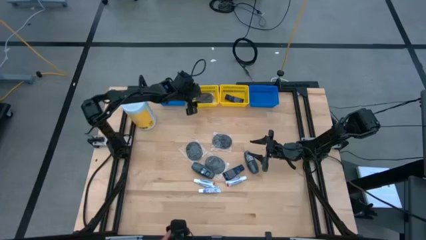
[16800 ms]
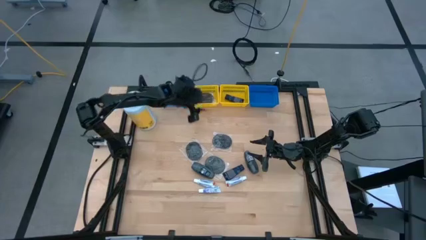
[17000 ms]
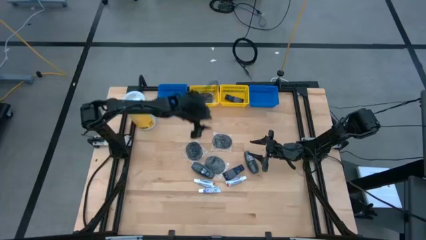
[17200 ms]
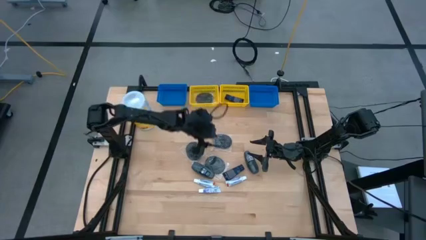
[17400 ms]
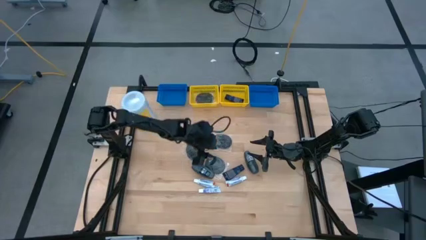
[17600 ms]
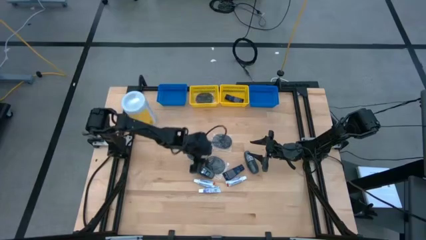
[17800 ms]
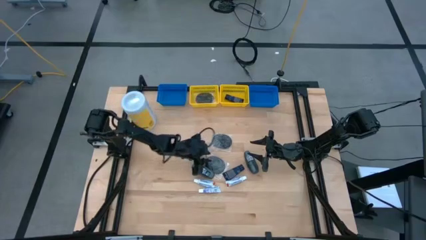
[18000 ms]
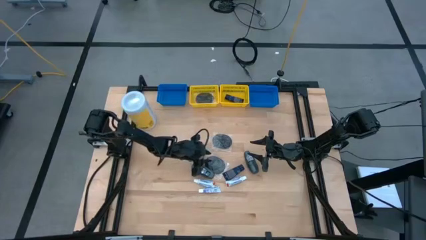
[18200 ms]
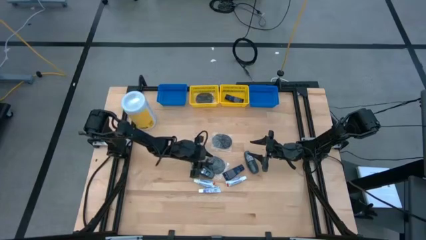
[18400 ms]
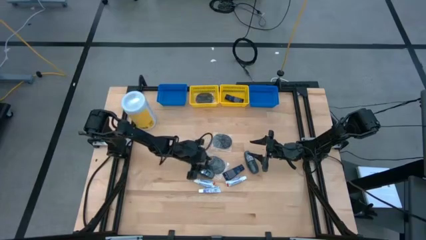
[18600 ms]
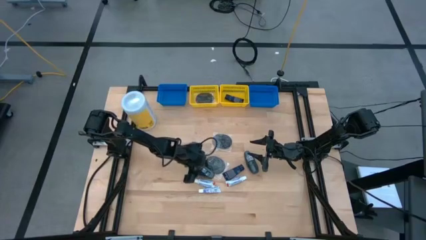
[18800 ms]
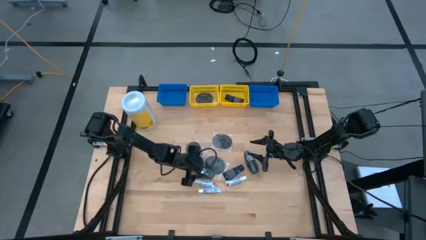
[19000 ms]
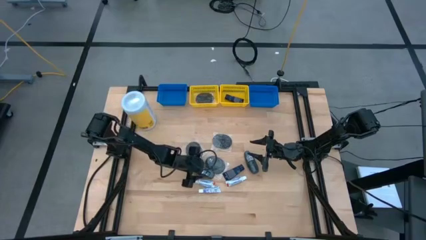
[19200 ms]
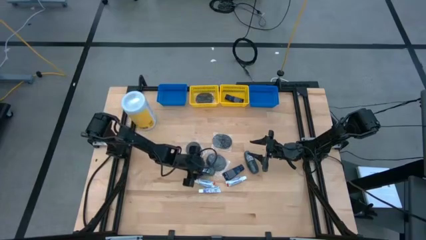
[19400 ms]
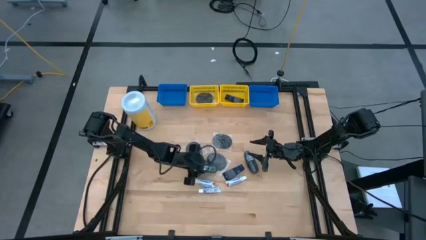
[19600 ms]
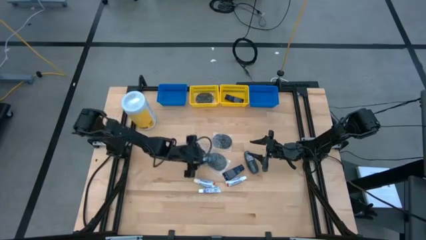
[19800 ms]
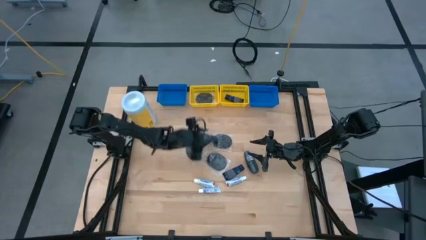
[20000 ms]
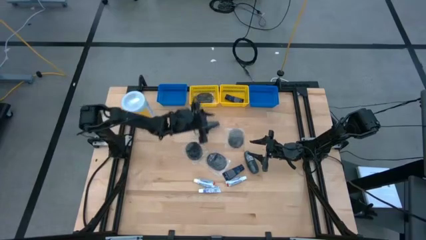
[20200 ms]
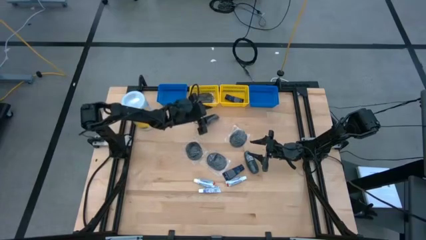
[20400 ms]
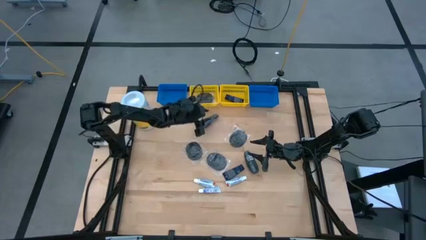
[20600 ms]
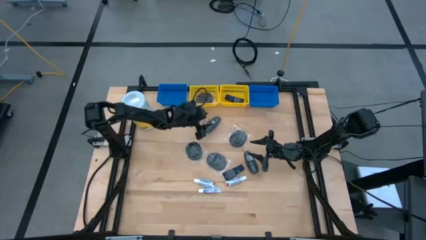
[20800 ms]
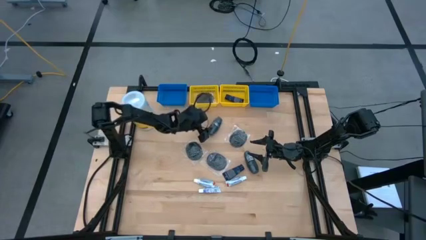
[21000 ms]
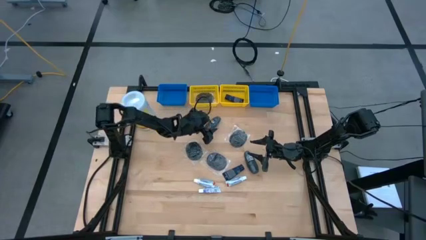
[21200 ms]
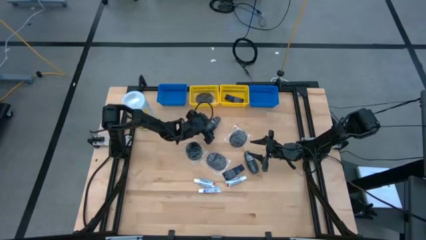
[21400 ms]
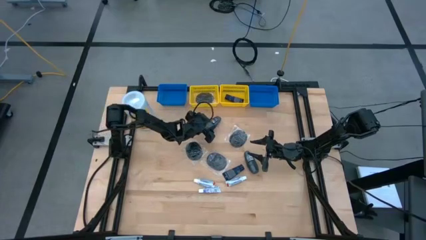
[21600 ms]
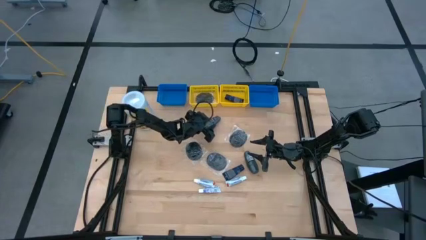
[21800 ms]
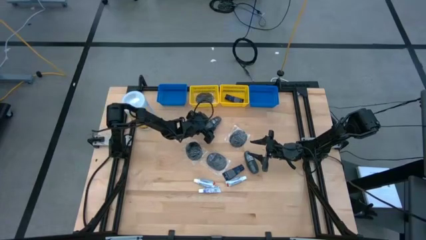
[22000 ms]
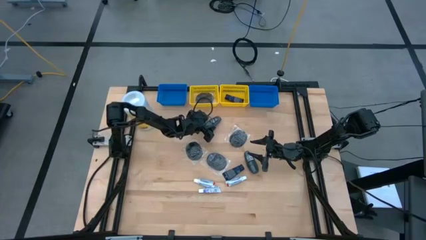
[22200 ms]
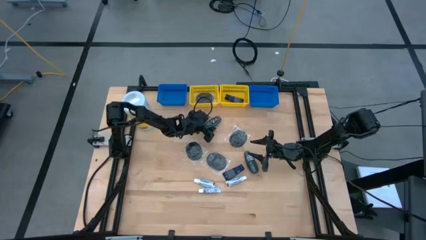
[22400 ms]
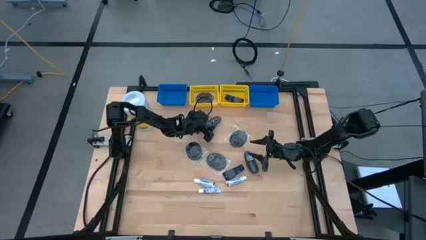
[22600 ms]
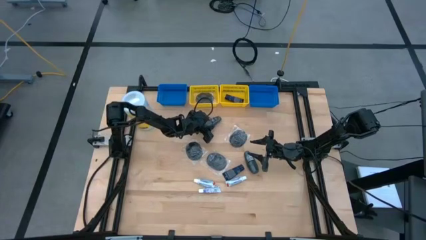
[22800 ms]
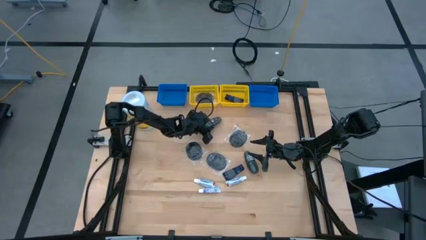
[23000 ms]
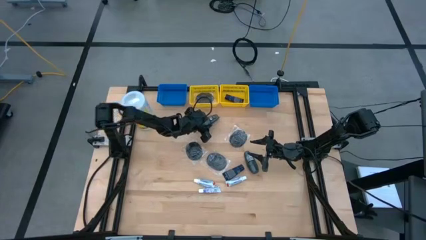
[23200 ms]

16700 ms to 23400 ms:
Task: Pick & Place Travel size toiletries
Put the deodorant into the left blue bin

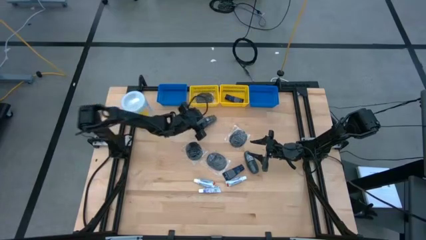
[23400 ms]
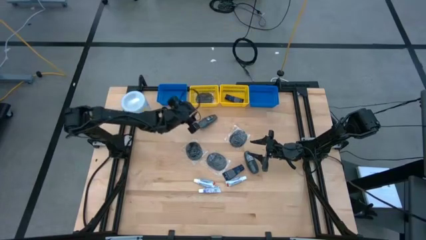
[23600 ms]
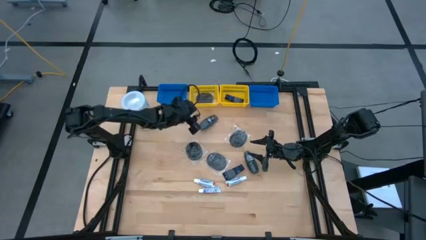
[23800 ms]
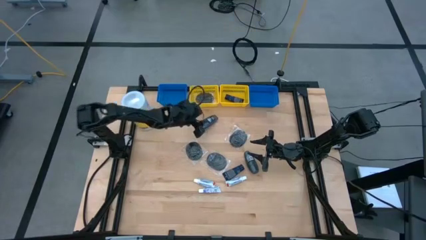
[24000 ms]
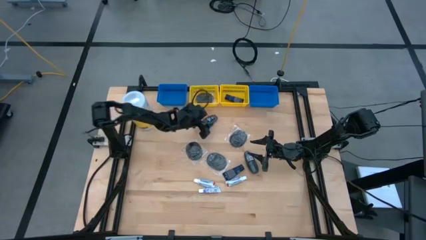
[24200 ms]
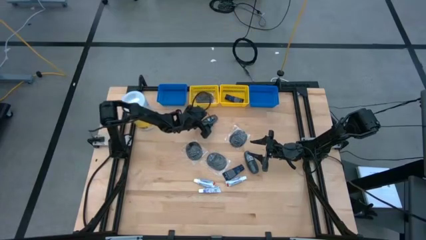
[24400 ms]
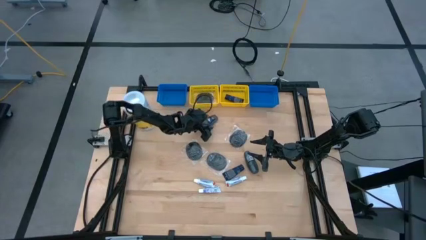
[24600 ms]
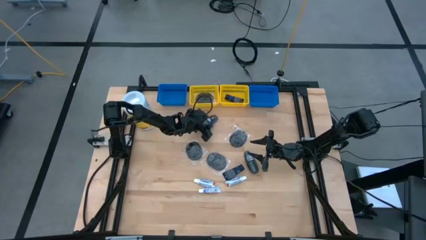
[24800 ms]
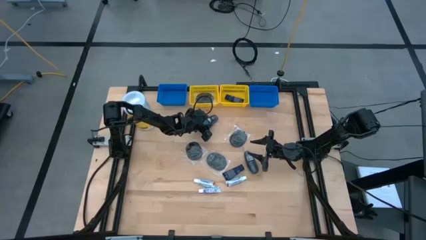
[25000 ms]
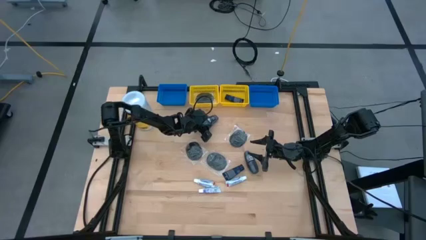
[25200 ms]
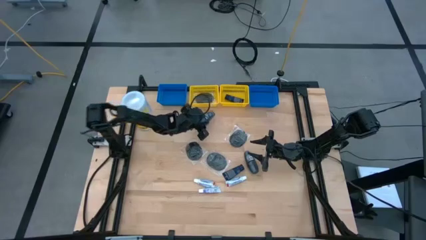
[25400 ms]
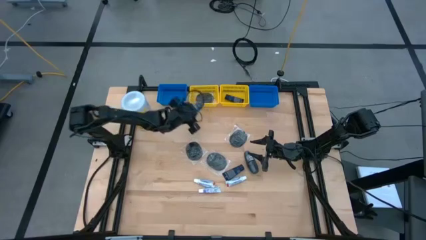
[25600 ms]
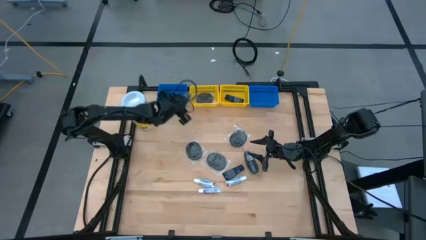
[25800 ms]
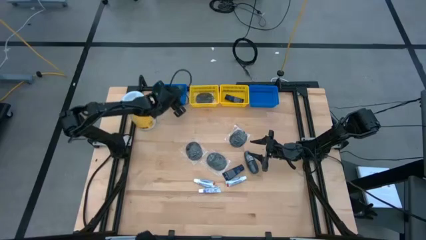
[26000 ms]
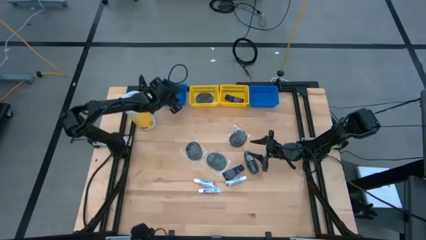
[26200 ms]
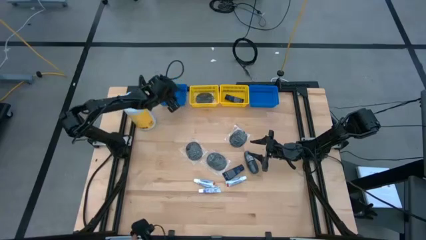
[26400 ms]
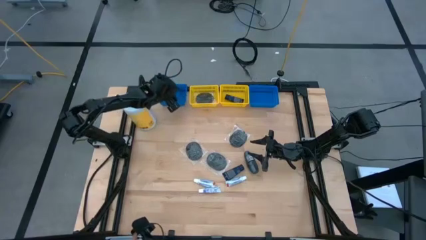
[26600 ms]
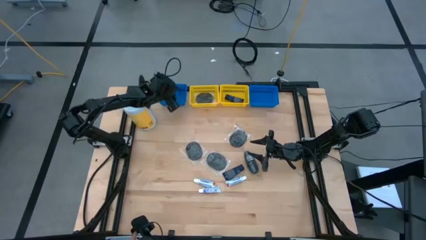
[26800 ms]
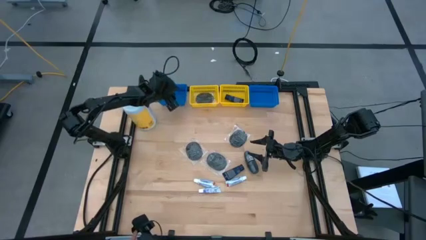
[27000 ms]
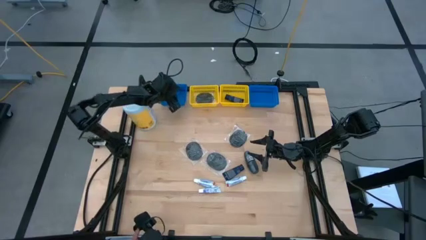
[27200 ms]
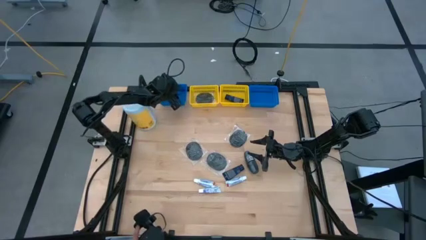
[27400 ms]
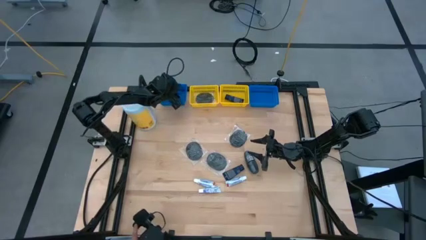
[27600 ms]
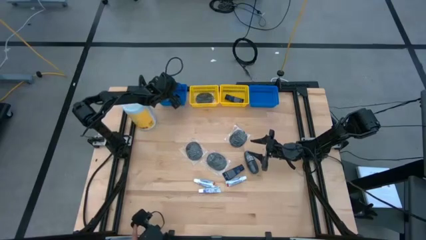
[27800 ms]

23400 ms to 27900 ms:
Put the deodorant into the left blue bin

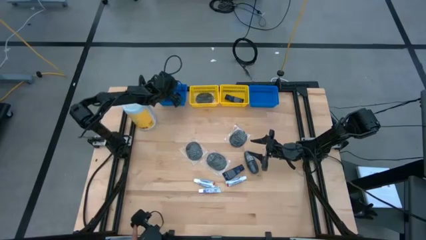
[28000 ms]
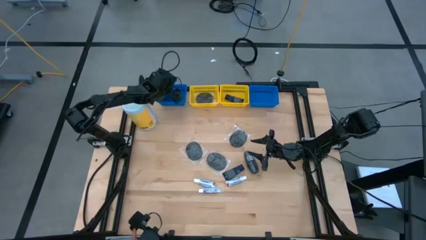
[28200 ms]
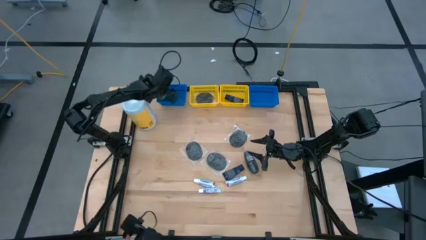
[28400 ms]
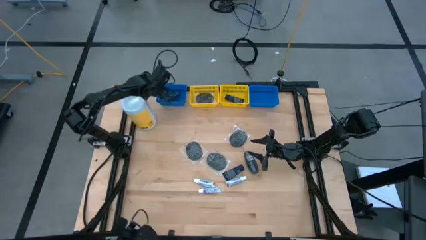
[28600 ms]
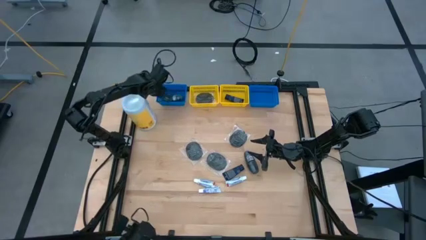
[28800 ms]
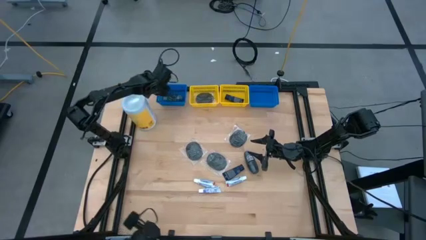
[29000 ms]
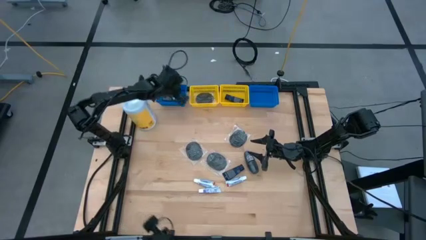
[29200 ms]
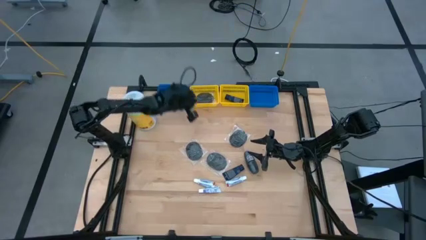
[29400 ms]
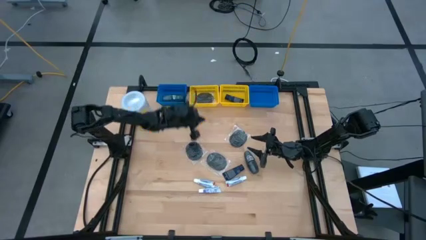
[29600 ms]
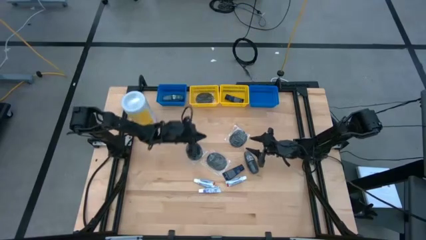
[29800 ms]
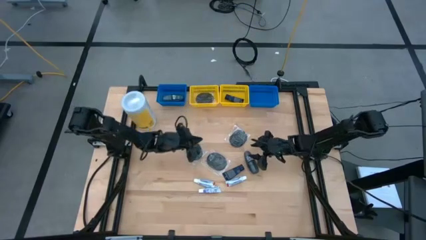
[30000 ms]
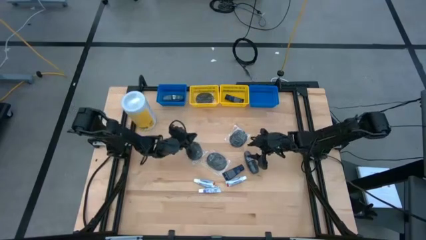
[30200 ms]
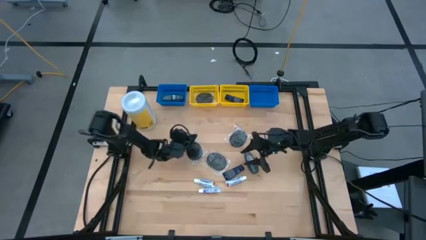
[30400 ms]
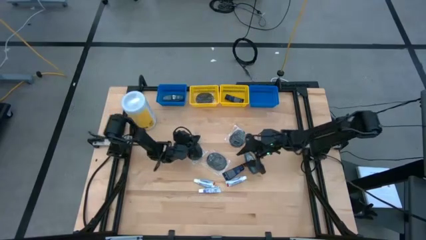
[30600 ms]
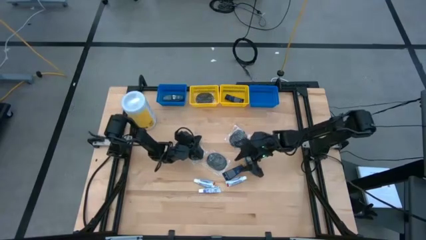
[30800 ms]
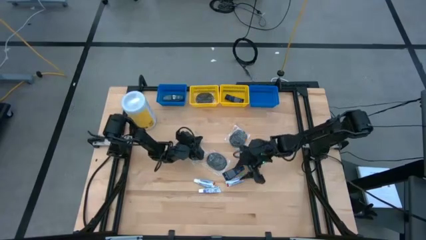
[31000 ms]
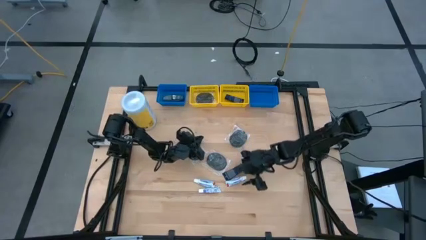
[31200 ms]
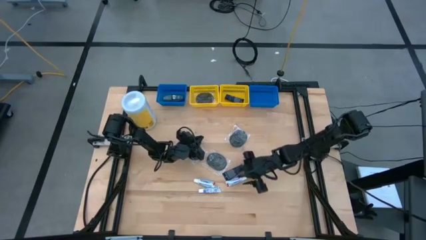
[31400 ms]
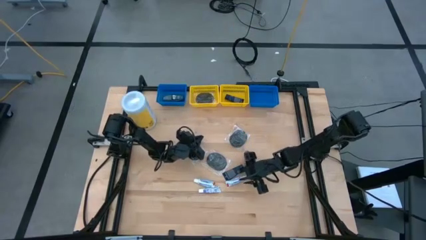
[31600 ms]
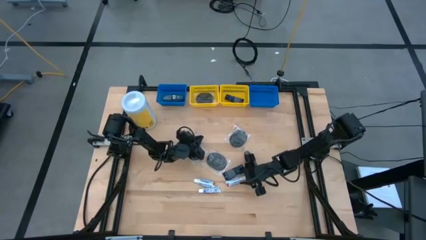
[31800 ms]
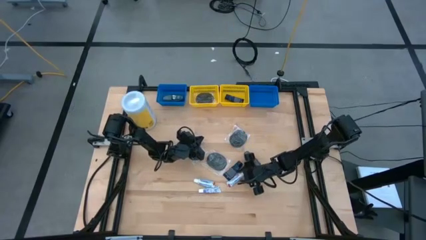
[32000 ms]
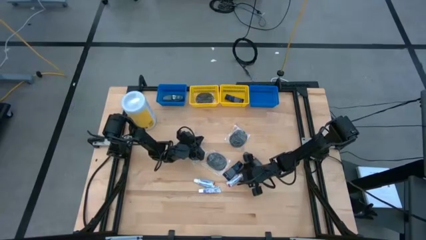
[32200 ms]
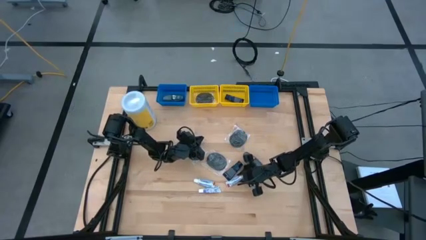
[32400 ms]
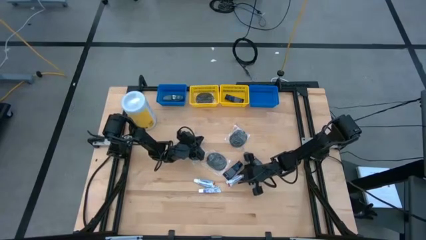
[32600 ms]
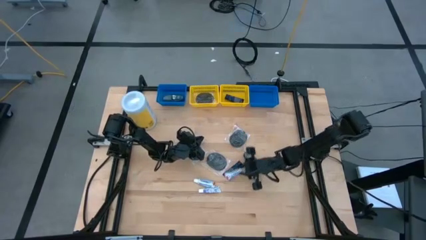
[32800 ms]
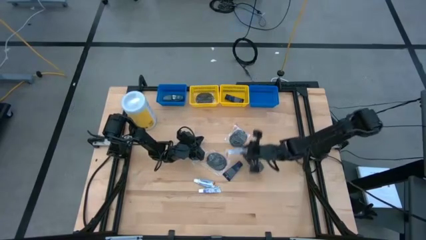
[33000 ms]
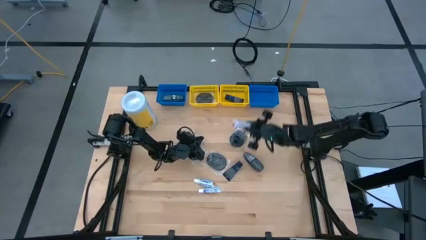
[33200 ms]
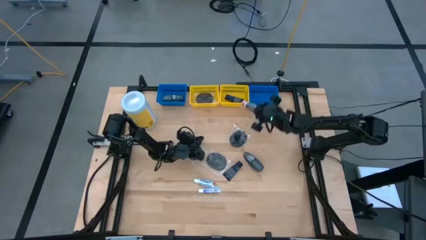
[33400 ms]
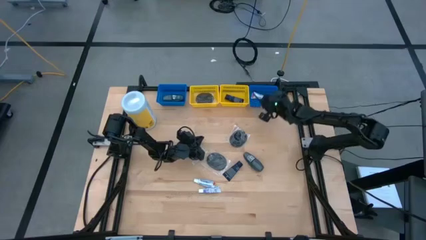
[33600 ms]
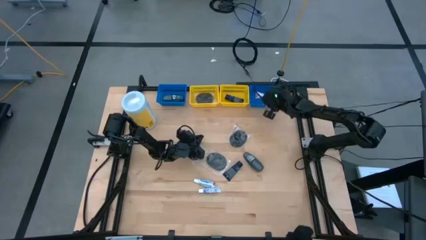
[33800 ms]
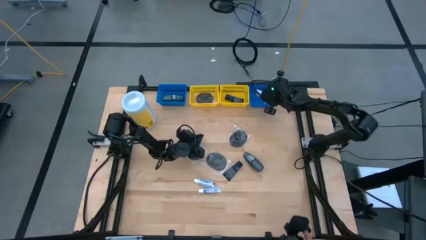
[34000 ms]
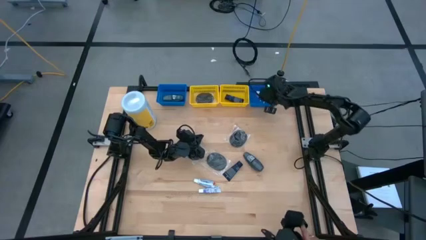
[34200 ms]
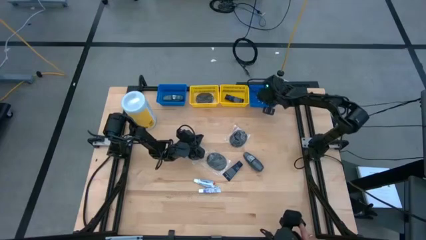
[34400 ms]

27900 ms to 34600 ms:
Put the toothpaste into the right blue bin
